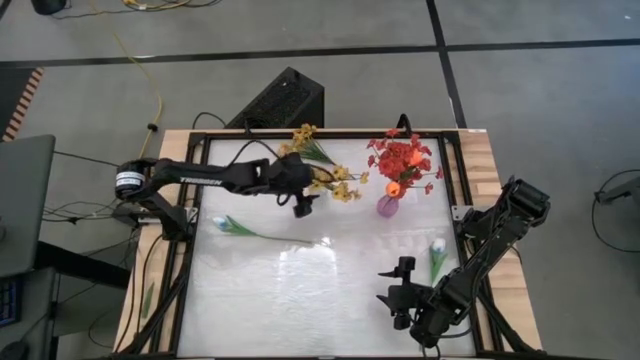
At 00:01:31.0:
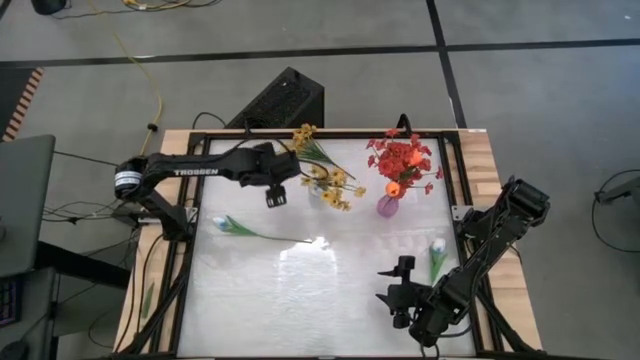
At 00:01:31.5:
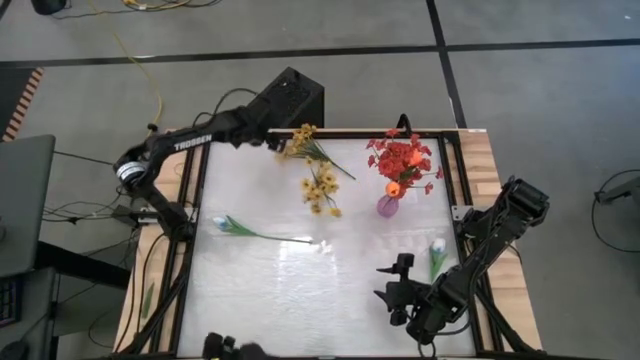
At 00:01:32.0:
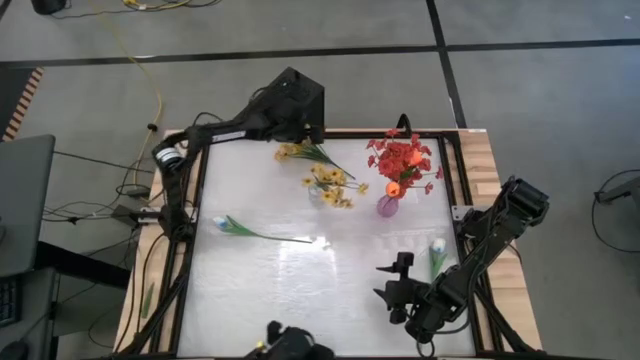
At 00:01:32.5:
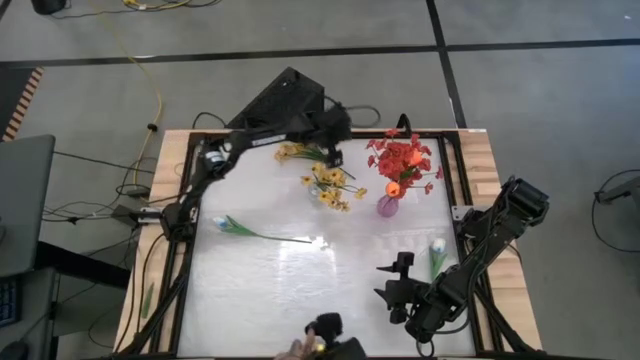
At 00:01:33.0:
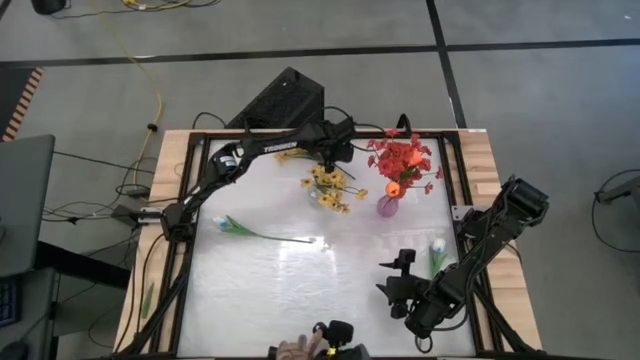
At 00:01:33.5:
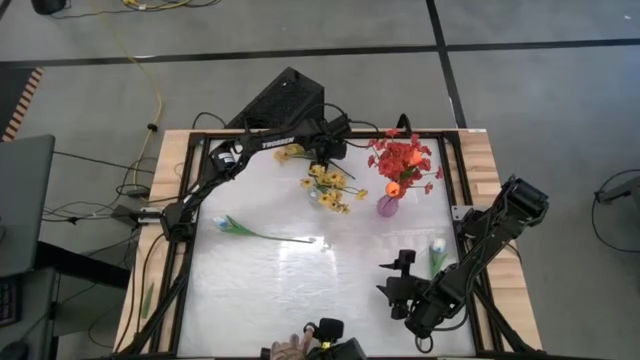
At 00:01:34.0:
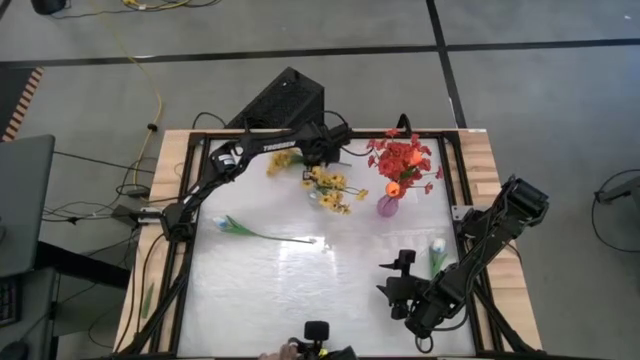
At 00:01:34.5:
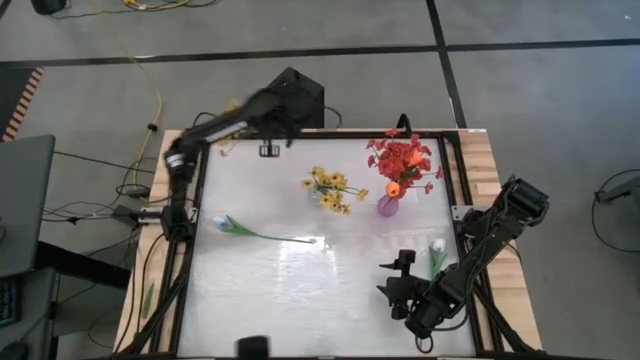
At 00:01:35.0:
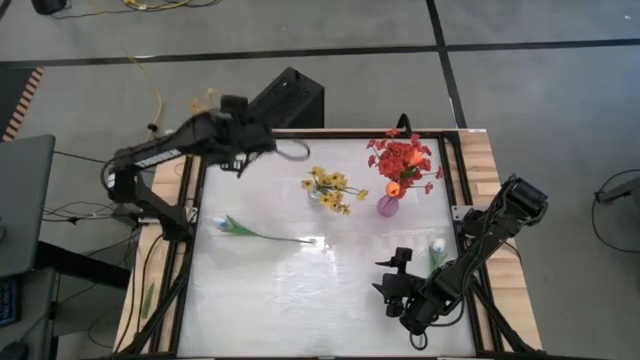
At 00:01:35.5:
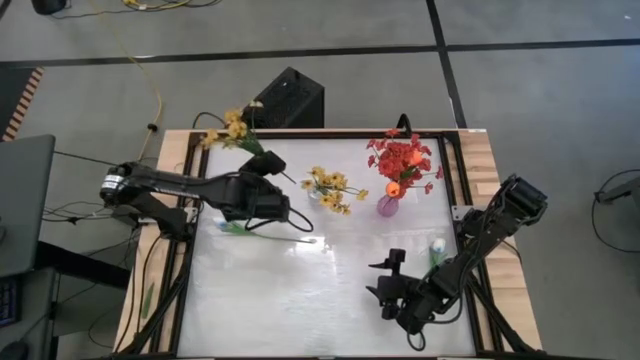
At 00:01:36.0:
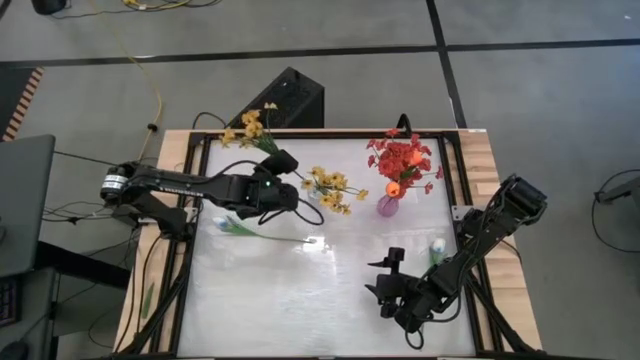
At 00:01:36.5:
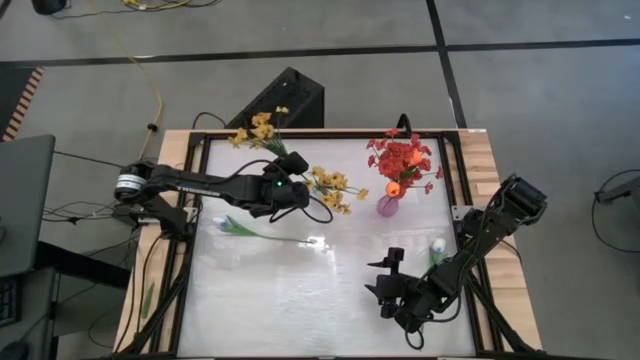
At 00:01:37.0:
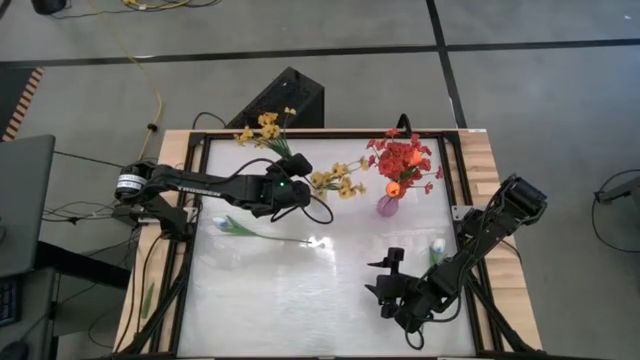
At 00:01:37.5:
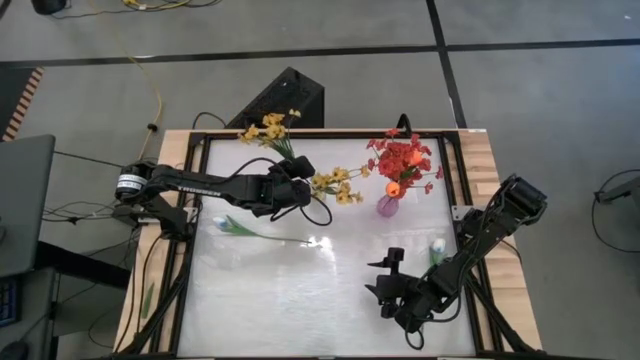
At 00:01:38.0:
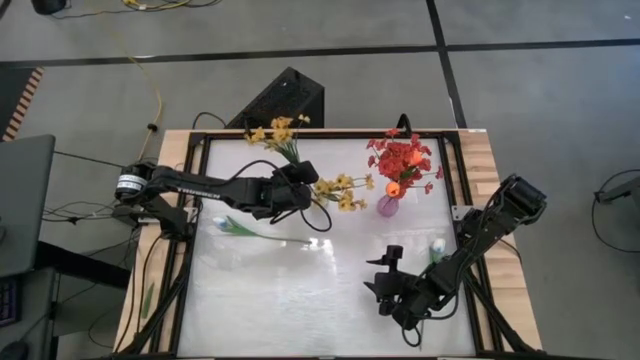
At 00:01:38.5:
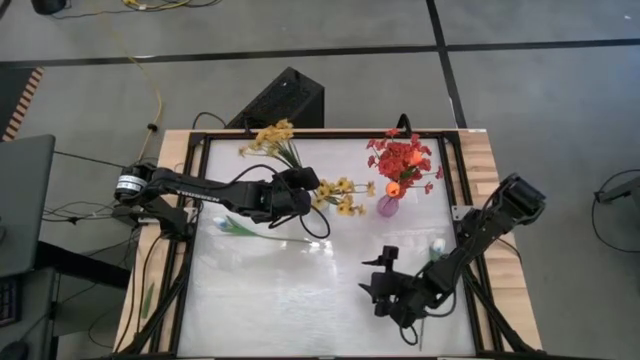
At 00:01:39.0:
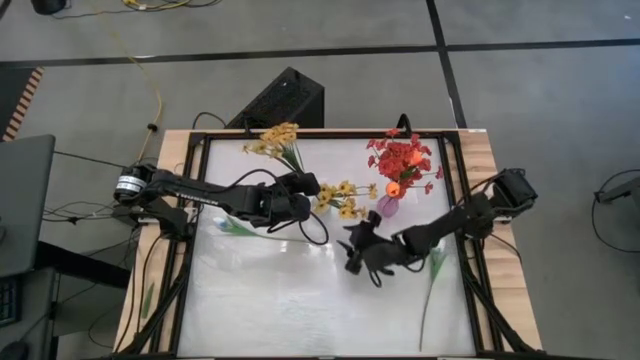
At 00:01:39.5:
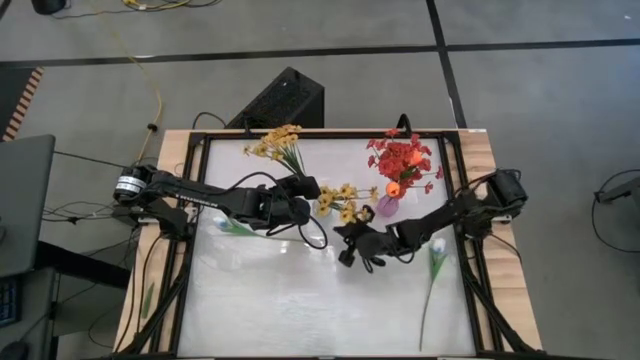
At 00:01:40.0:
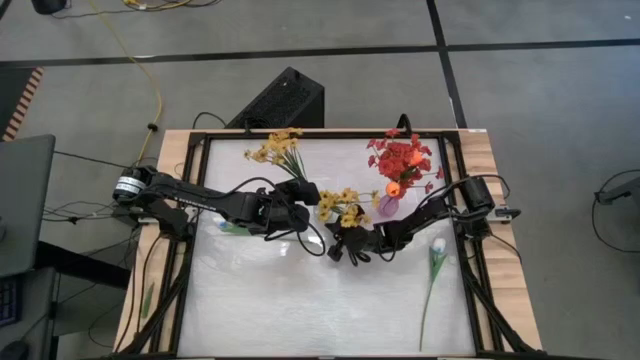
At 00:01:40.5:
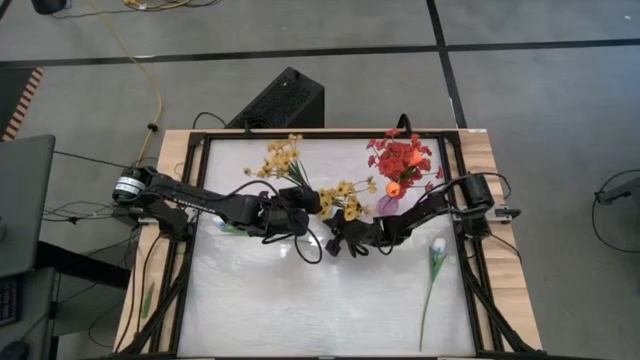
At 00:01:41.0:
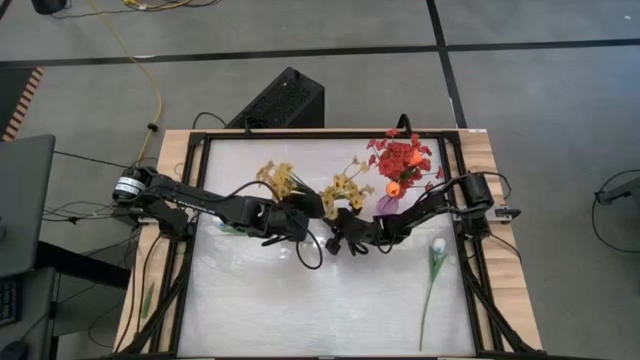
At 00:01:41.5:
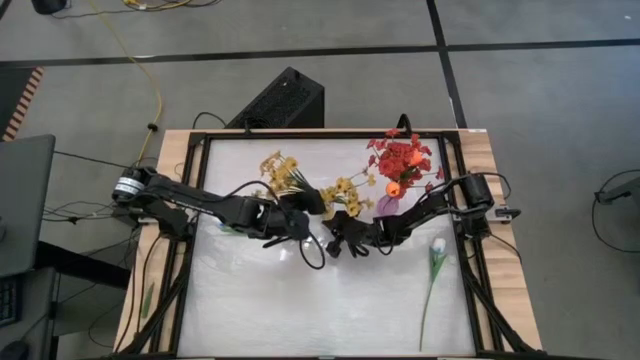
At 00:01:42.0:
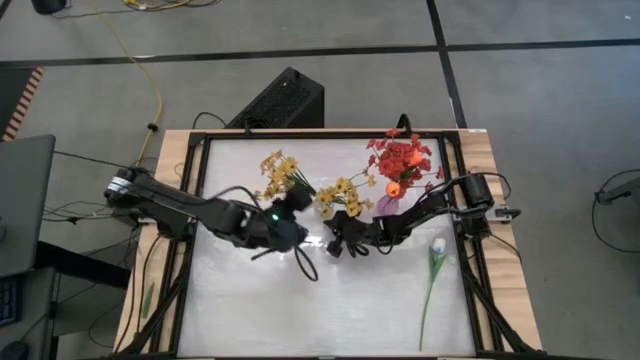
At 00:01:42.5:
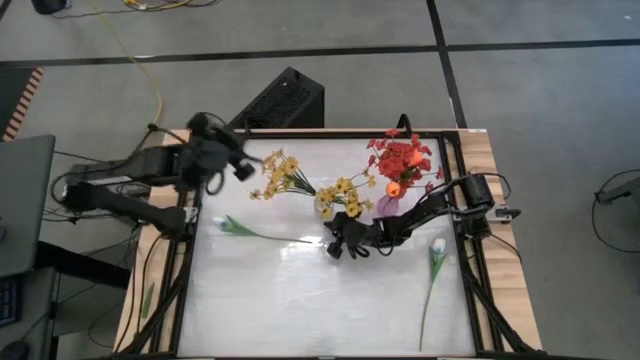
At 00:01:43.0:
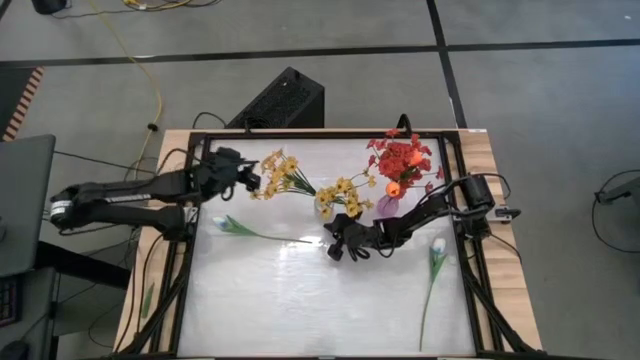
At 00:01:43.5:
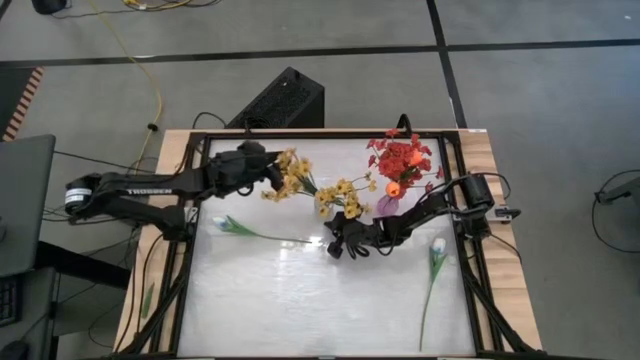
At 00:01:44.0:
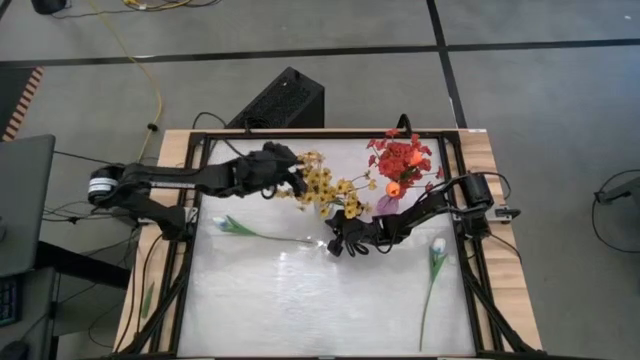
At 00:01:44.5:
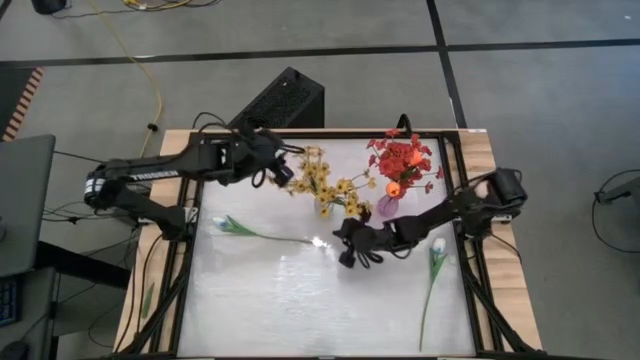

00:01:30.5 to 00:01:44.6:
Task: Sort flowers into vase by color
Put the yellow flower into the transparent flower vase

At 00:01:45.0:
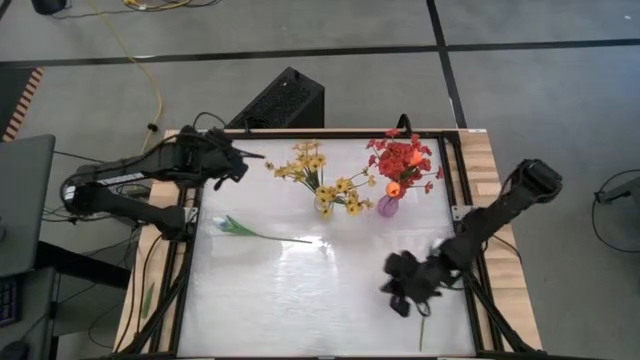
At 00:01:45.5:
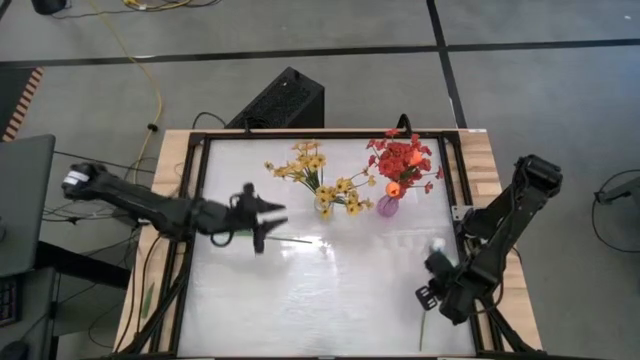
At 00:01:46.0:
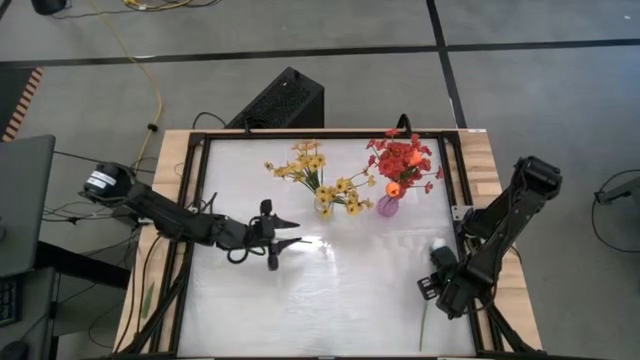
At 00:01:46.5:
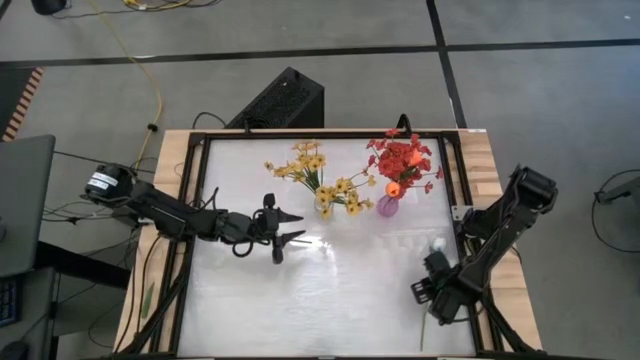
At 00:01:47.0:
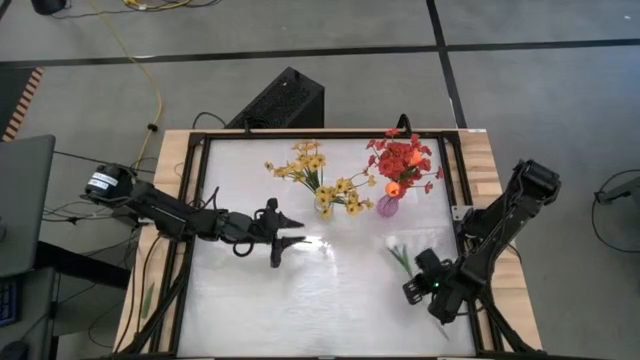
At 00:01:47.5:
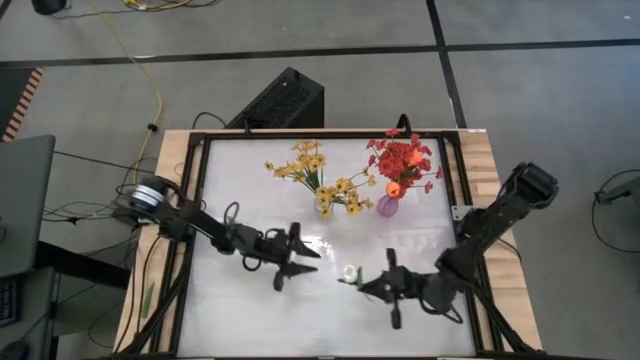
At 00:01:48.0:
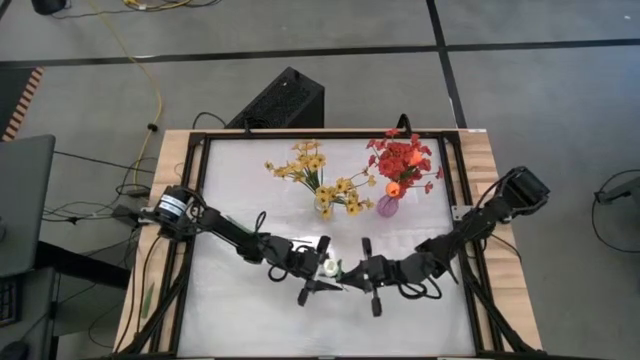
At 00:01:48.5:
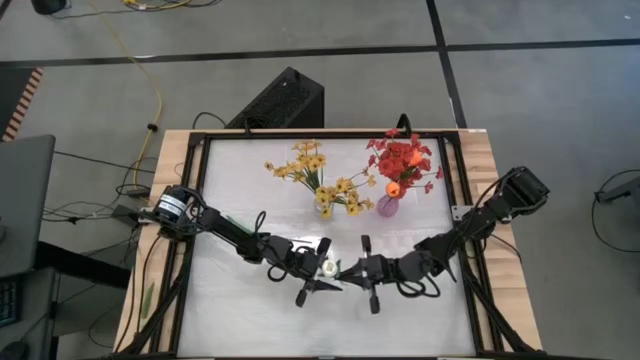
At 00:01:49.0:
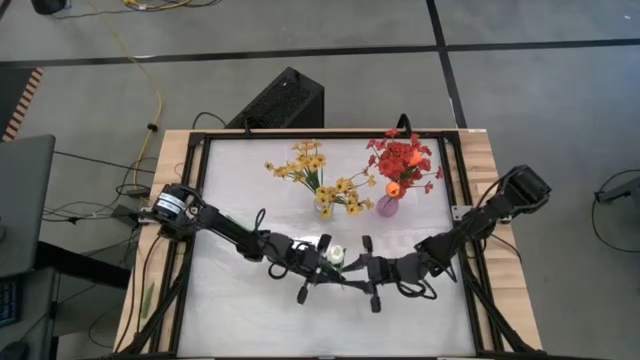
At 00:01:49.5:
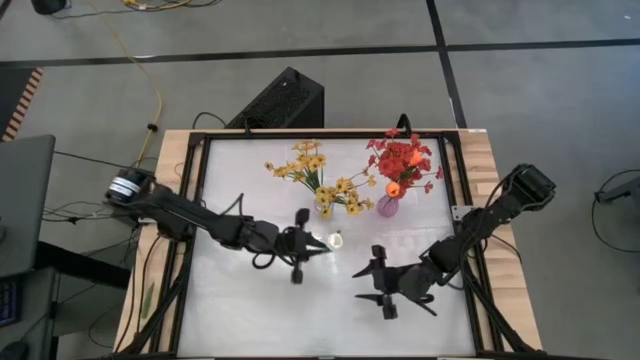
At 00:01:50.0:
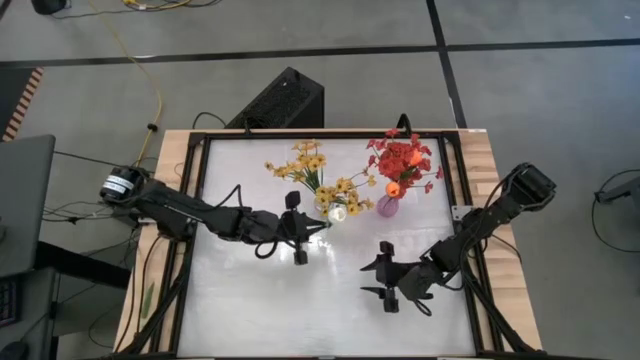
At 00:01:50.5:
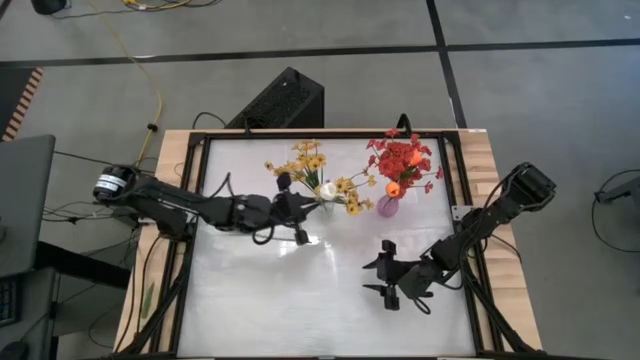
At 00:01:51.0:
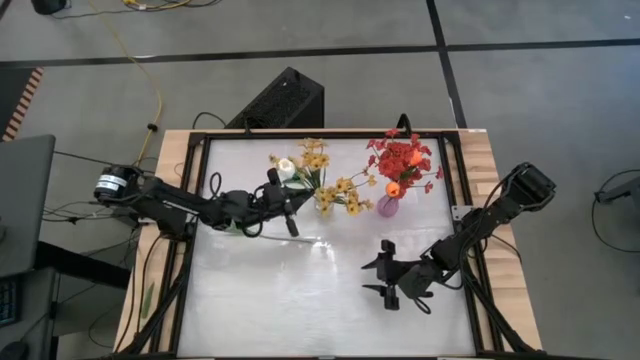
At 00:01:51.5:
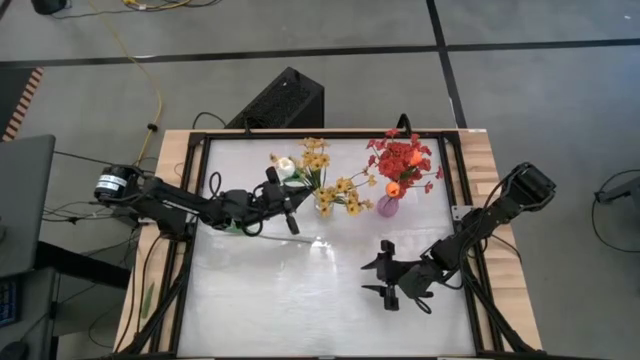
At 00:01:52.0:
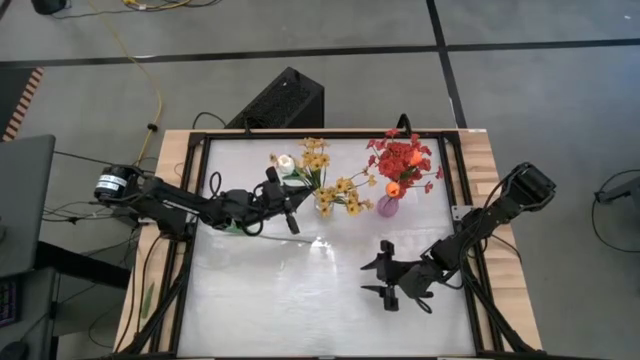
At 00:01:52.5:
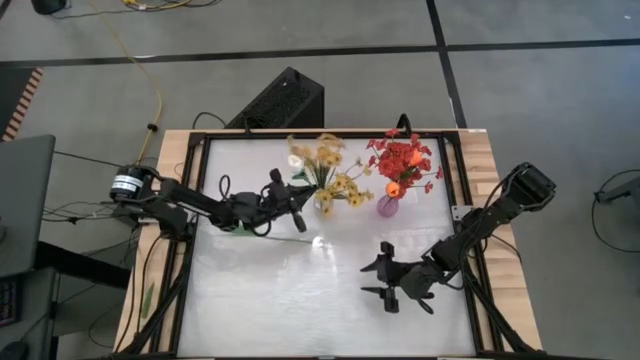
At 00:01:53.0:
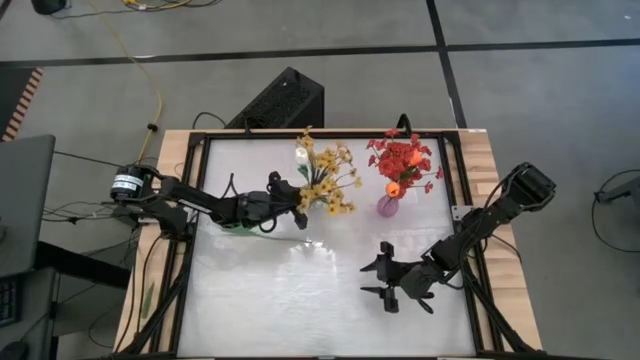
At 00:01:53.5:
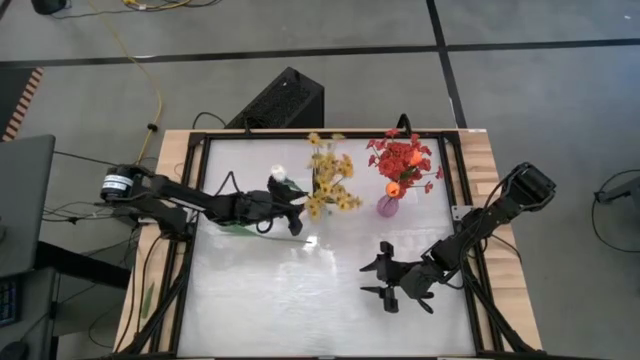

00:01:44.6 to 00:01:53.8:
Put the right white flower into the transparent flower vase
